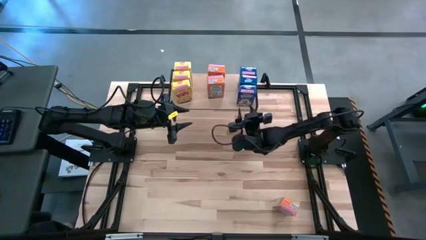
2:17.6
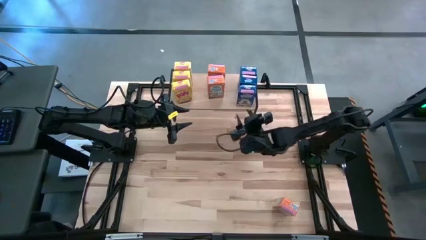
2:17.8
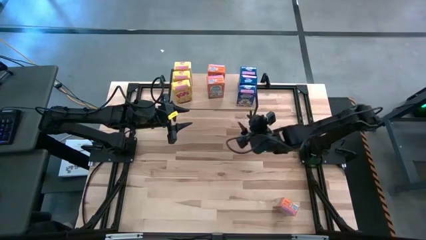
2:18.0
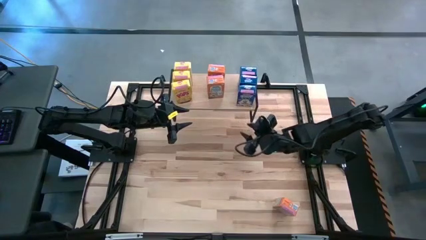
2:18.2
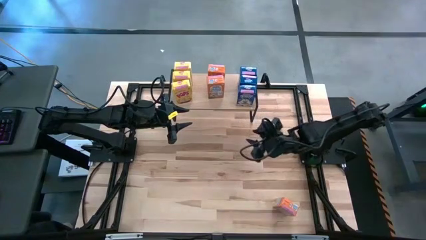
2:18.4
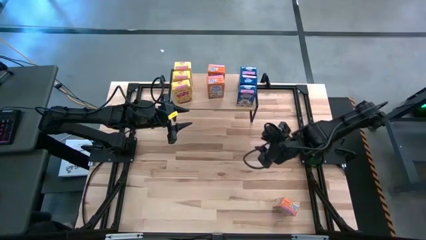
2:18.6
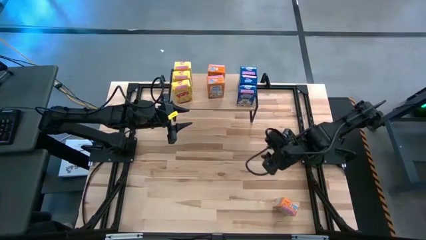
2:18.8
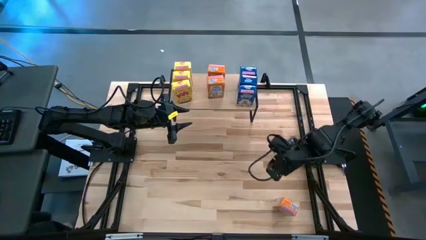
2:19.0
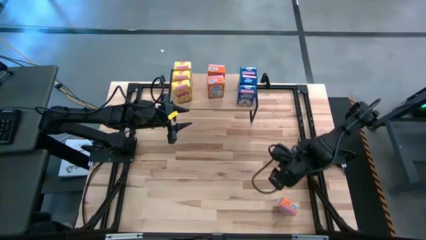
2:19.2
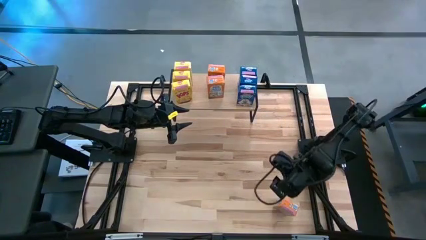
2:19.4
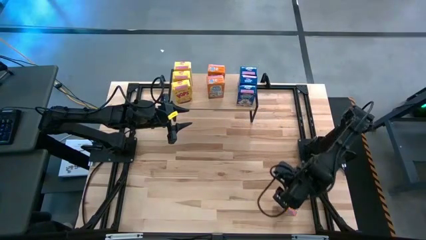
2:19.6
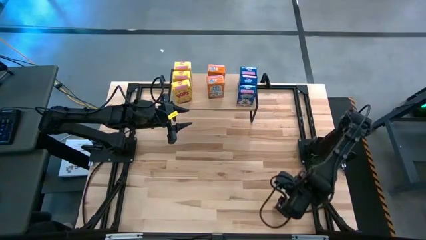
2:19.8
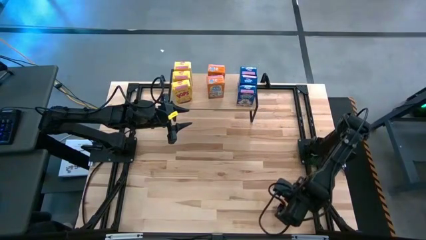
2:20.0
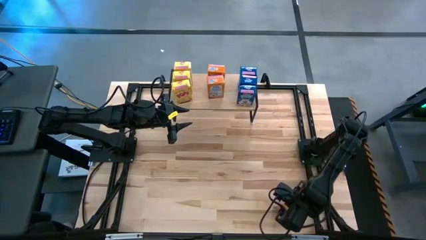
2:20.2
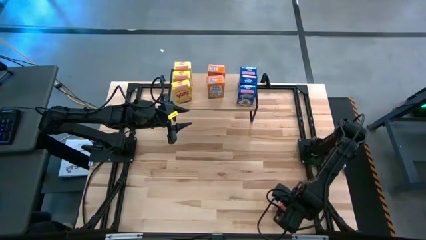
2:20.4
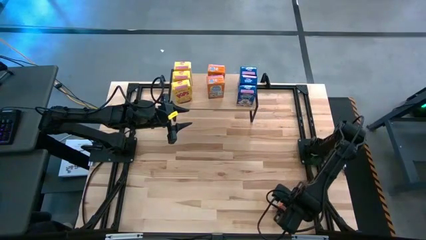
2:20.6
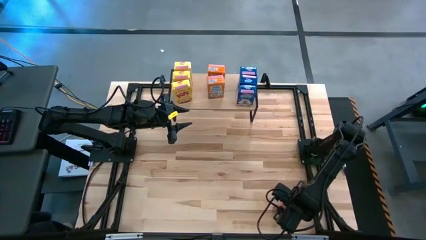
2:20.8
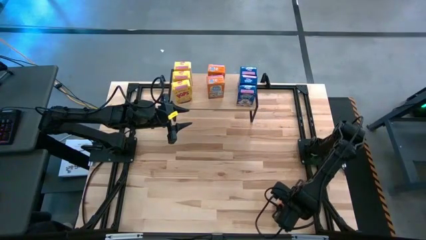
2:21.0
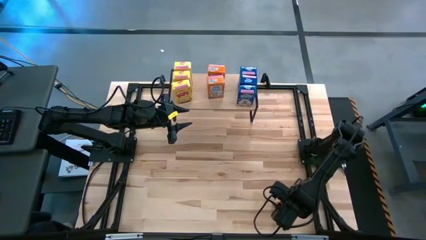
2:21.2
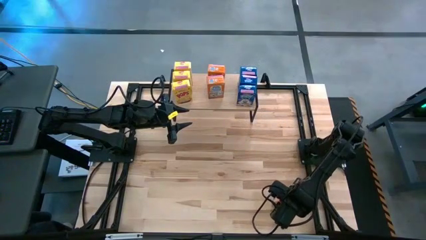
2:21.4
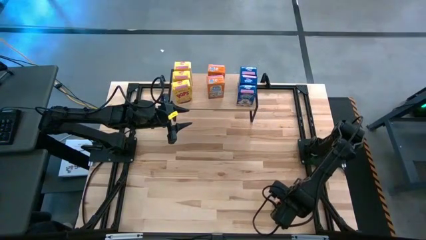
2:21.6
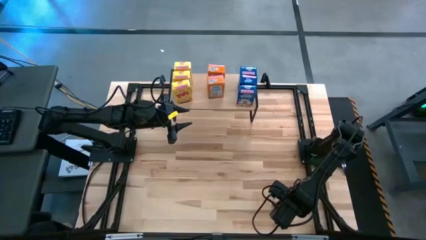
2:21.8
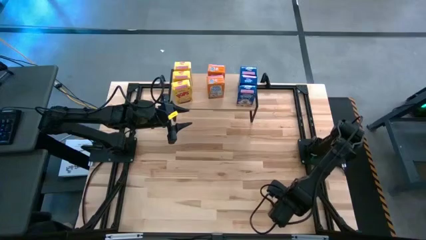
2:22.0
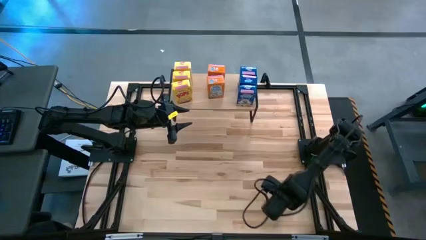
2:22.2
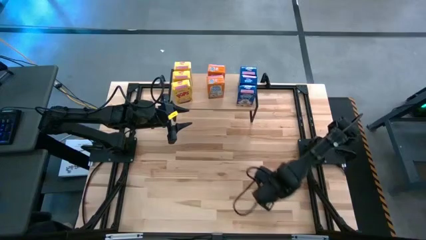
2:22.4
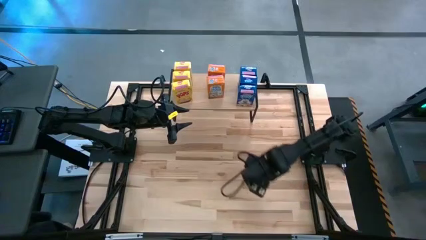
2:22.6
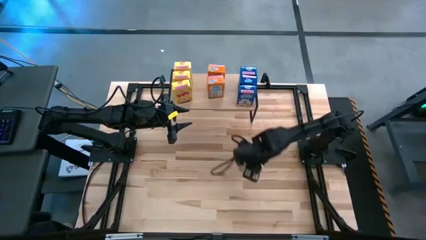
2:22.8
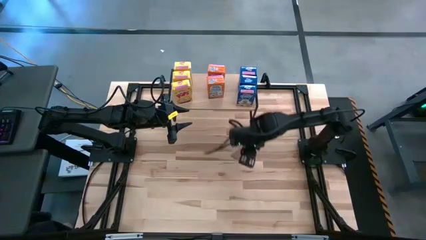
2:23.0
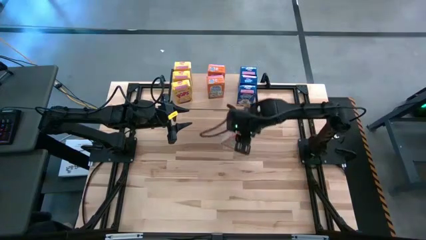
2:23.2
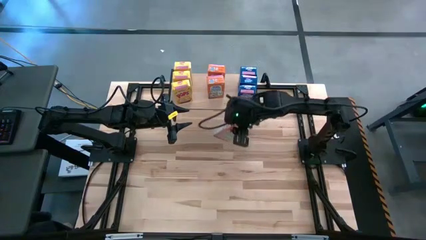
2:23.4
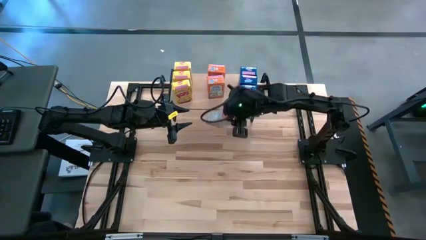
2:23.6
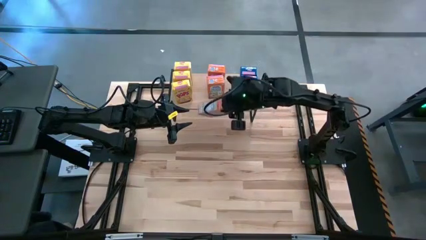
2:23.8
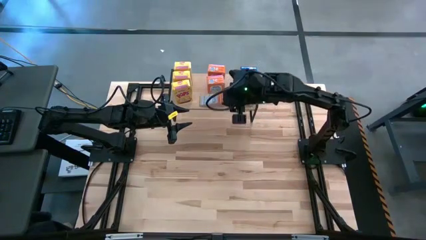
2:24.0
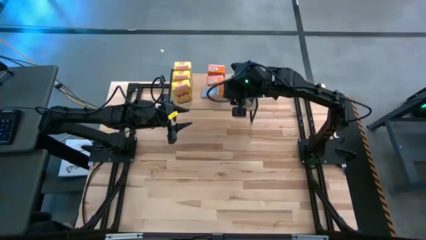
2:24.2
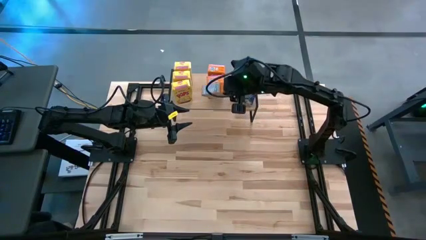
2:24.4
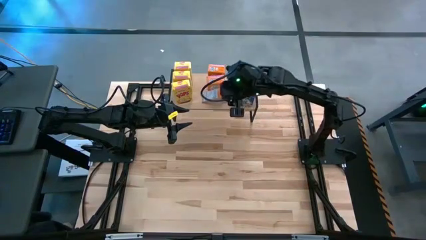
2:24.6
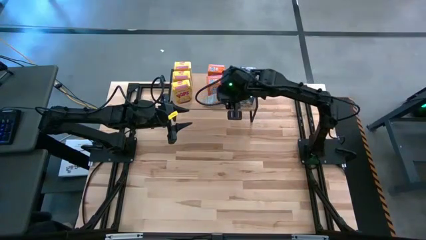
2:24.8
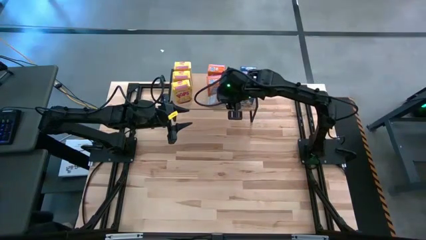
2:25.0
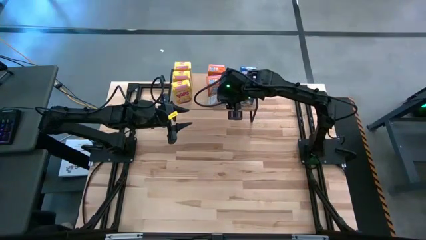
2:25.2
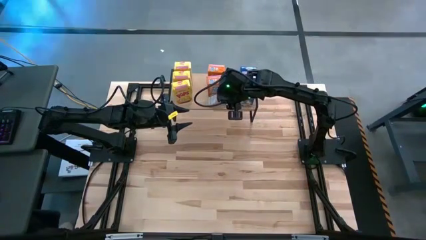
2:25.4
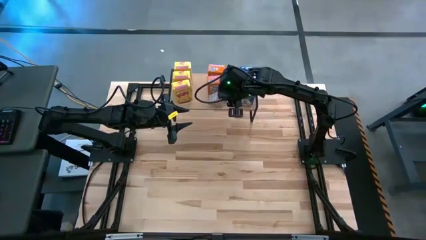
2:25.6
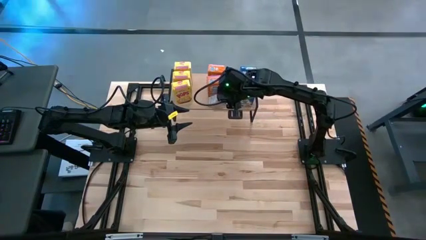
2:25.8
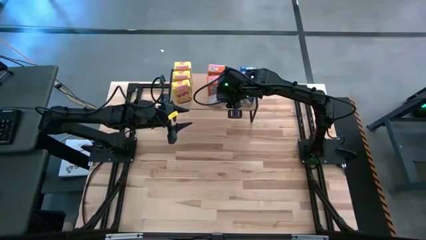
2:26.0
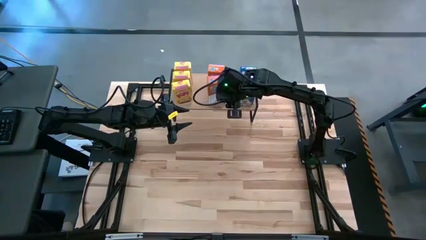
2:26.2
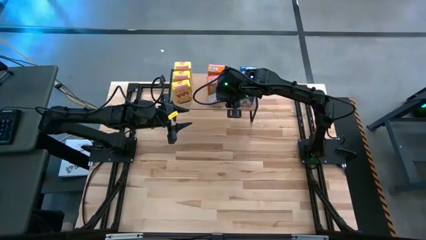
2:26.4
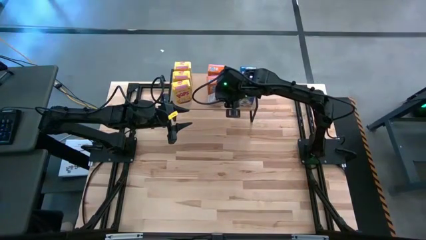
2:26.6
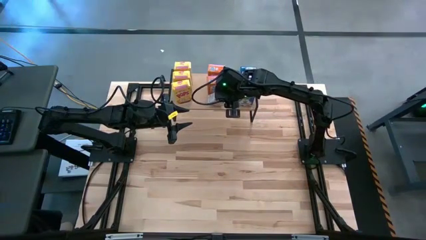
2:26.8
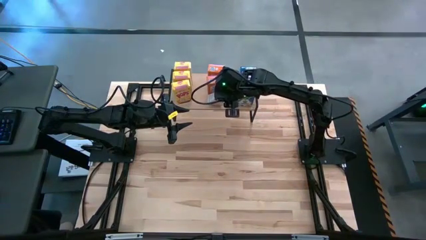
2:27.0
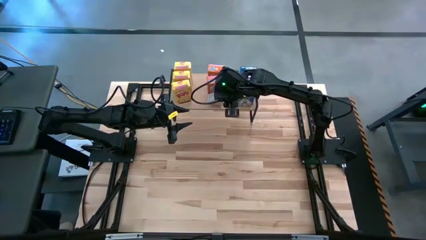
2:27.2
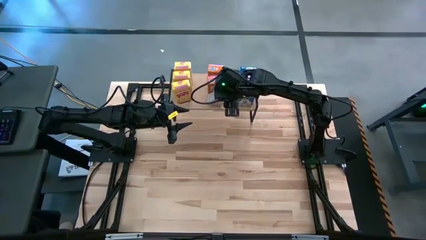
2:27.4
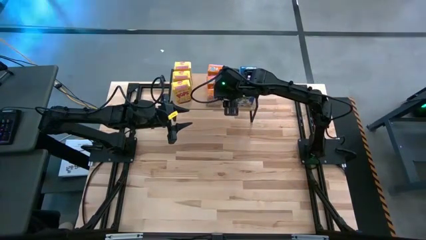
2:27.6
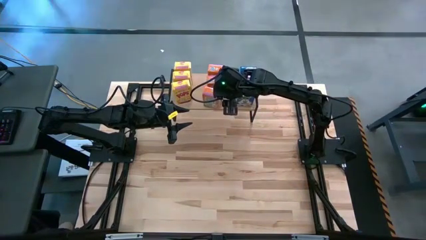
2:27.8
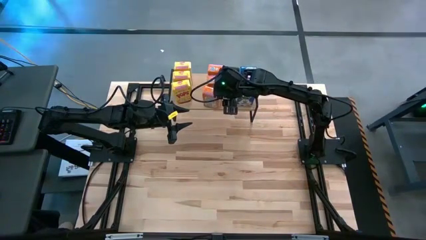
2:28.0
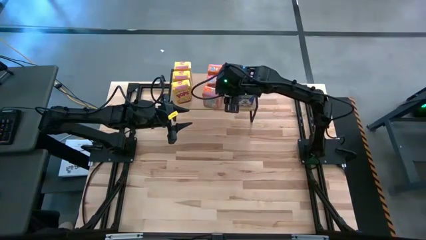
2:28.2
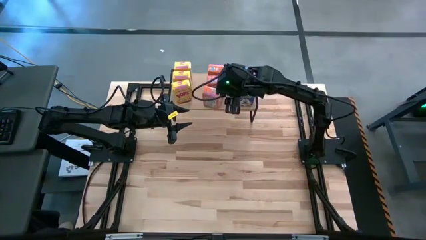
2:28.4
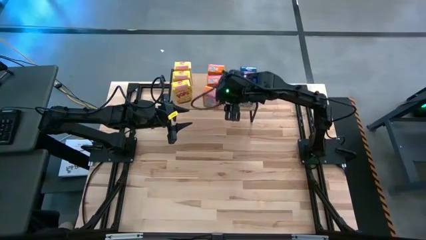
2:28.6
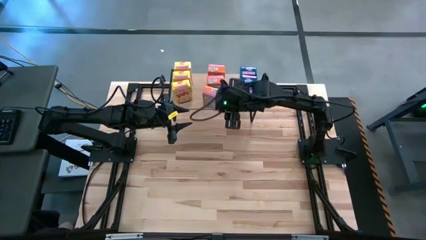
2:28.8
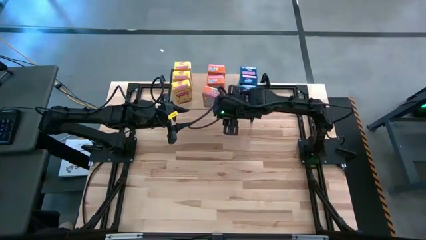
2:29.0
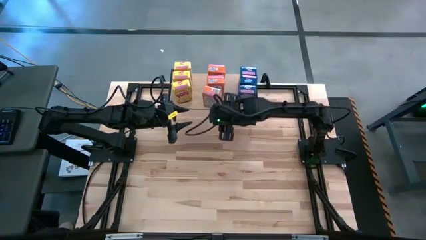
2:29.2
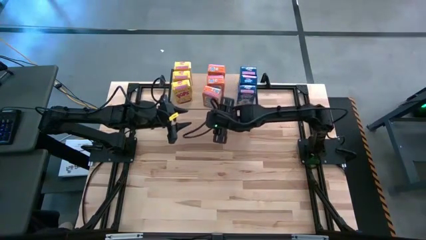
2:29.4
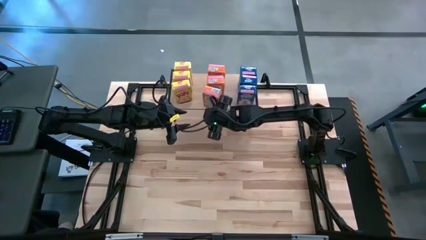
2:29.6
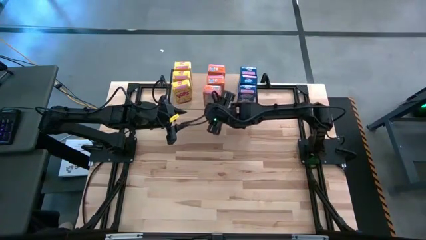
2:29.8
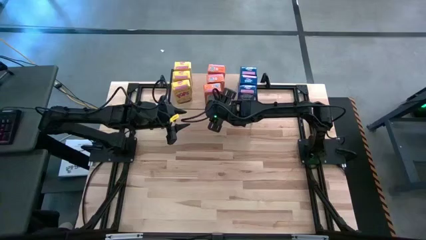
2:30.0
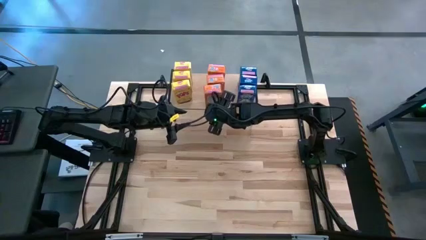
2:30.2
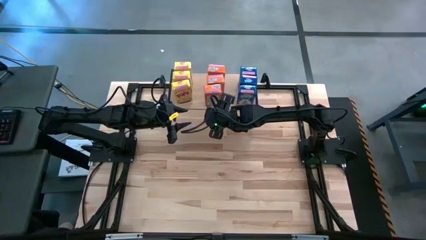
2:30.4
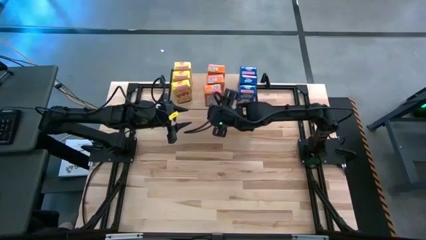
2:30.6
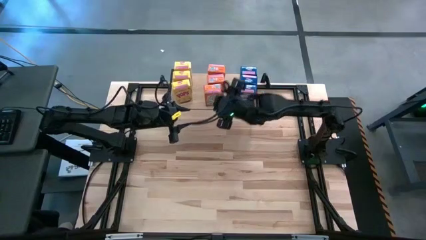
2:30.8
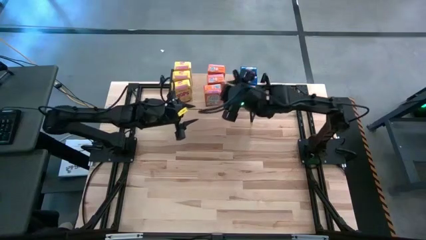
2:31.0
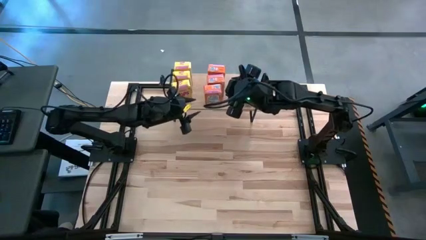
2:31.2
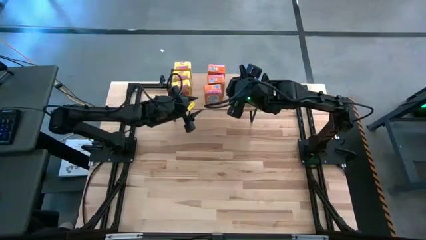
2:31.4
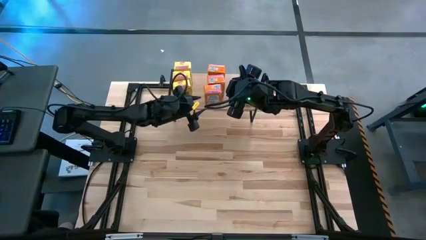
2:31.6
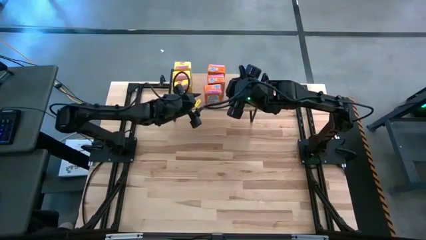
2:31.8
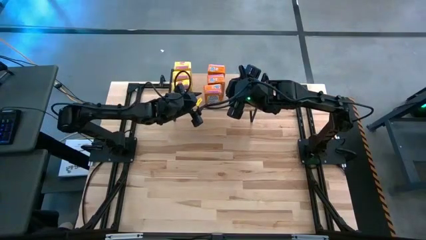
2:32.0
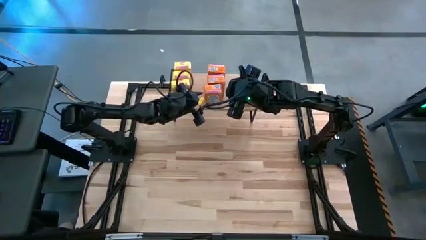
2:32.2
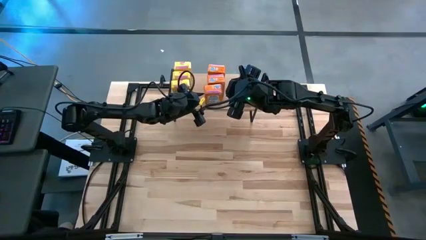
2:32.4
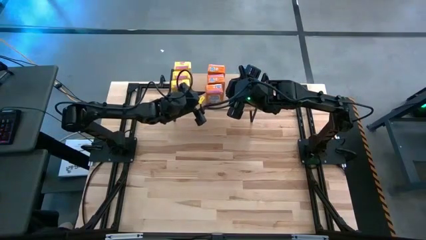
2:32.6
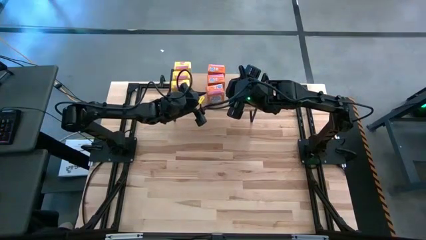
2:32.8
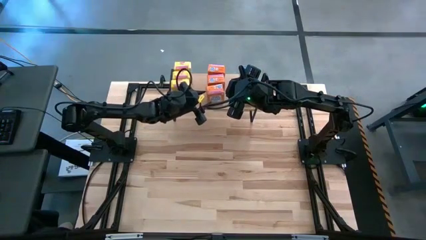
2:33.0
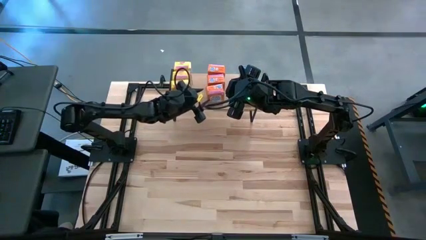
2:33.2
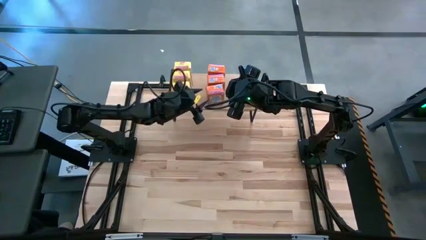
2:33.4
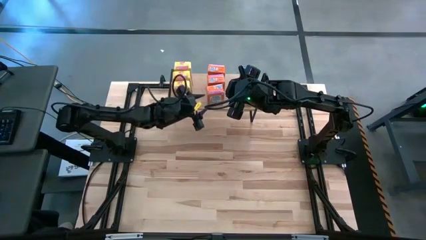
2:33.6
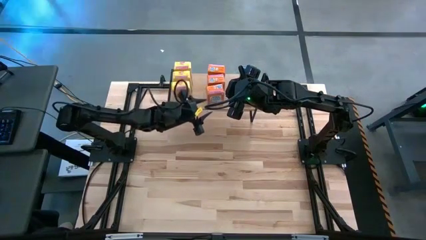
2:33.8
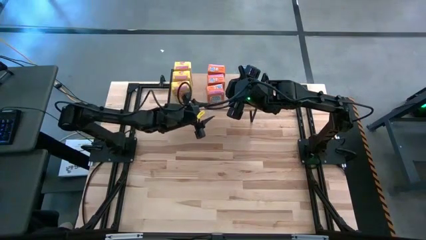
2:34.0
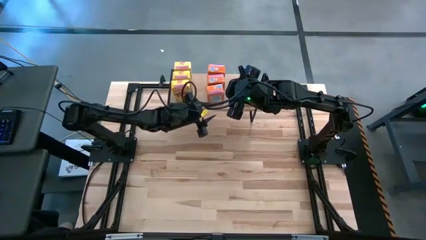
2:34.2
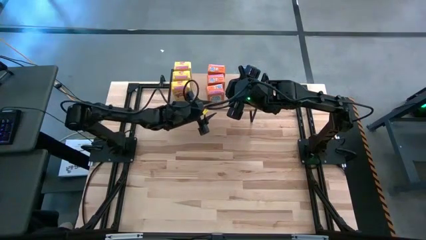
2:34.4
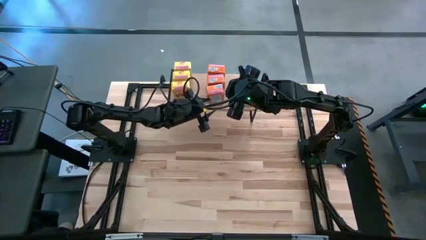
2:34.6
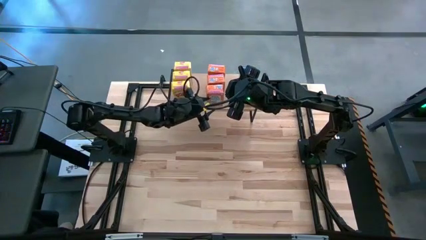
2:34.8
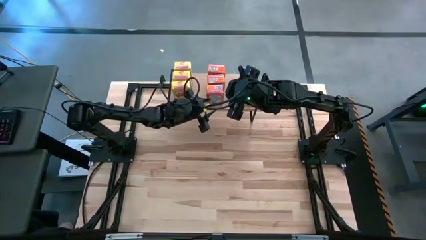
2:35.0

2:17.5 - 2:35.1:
Task: Stack cereal on shelf
Put the orange cereal box on the shelf aligned with the other orange cereal boxes
